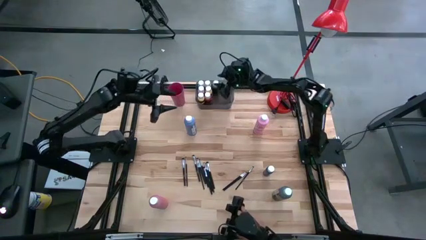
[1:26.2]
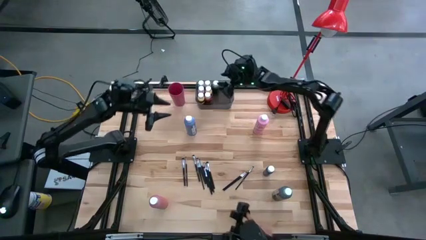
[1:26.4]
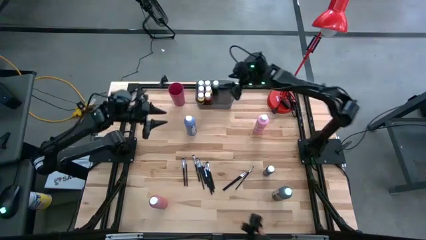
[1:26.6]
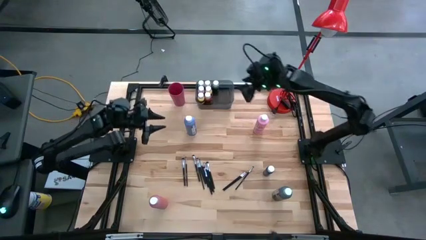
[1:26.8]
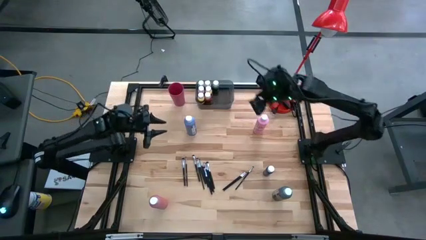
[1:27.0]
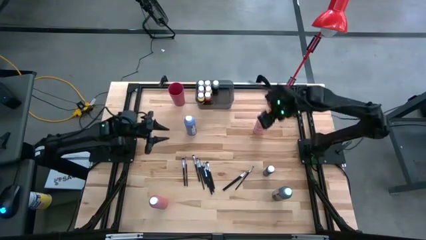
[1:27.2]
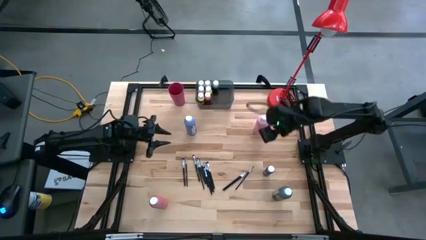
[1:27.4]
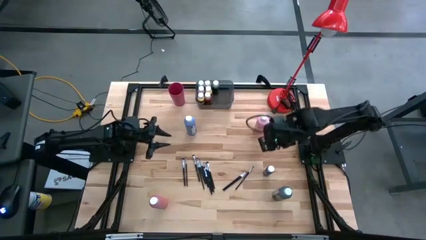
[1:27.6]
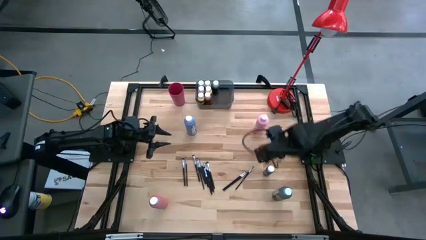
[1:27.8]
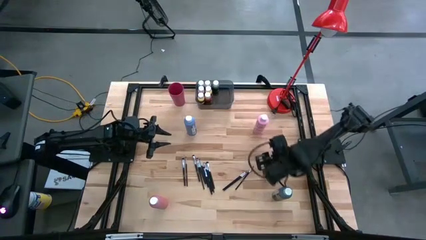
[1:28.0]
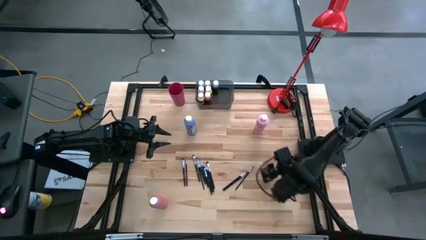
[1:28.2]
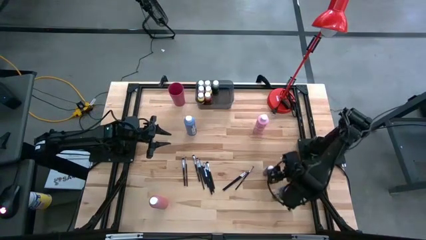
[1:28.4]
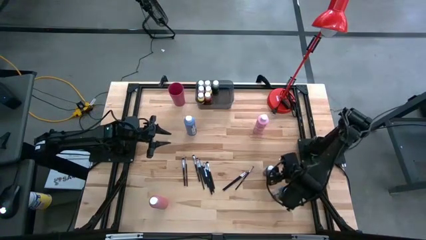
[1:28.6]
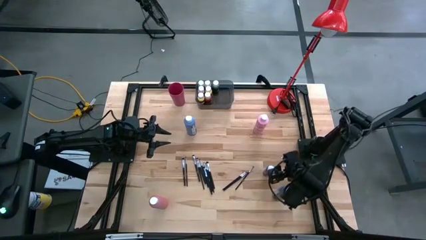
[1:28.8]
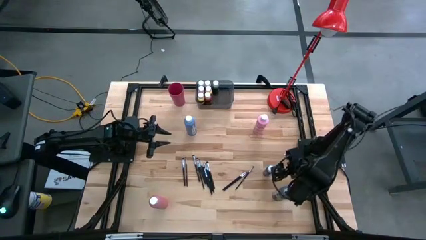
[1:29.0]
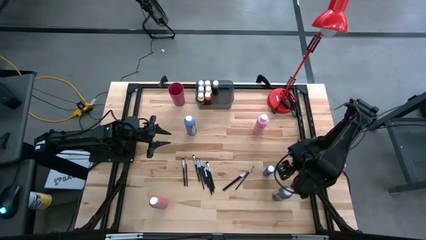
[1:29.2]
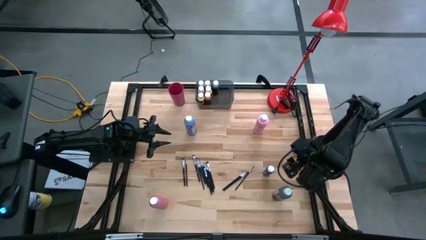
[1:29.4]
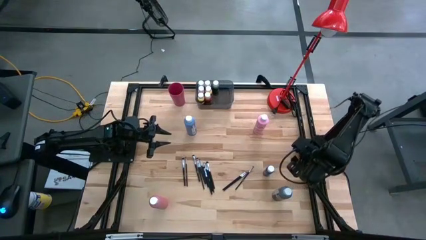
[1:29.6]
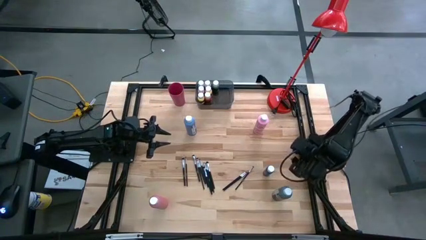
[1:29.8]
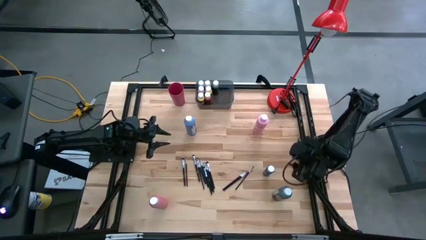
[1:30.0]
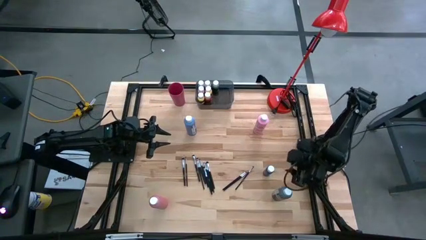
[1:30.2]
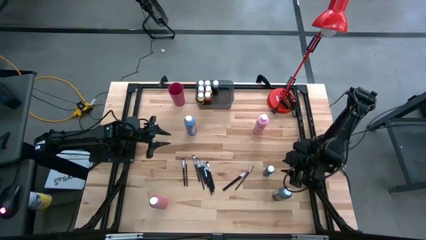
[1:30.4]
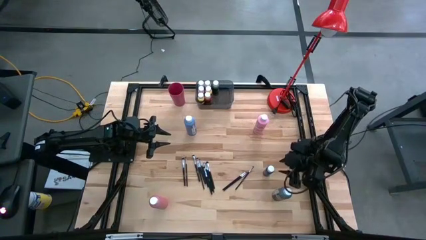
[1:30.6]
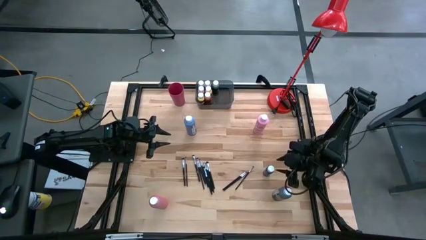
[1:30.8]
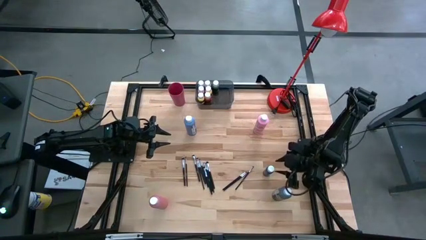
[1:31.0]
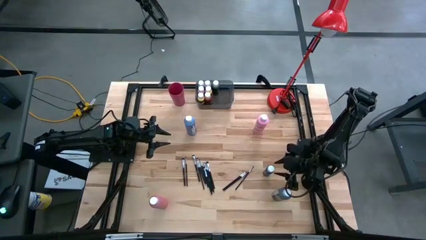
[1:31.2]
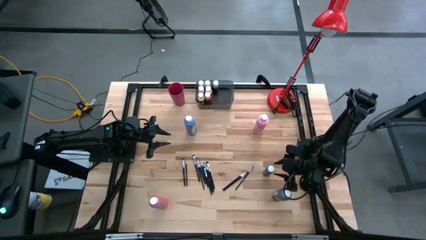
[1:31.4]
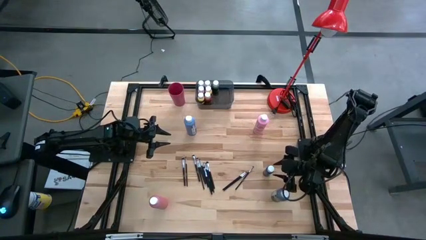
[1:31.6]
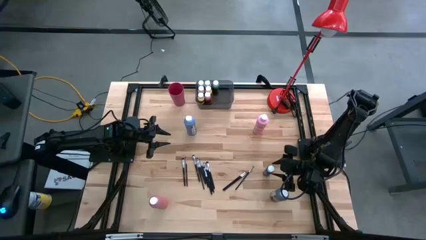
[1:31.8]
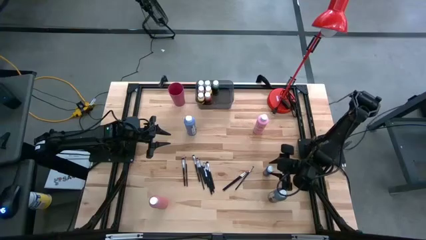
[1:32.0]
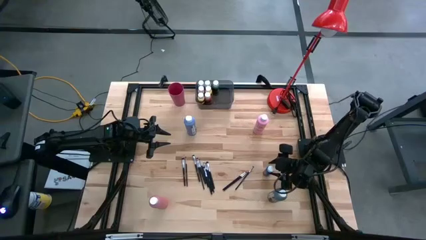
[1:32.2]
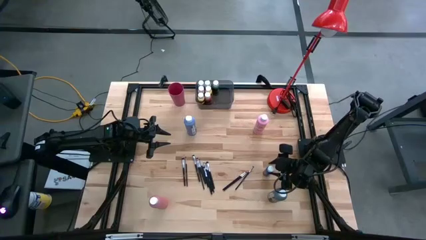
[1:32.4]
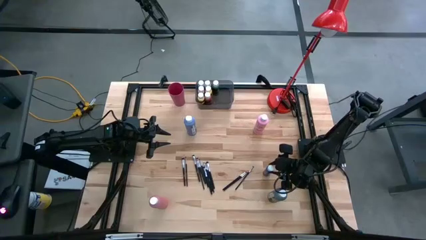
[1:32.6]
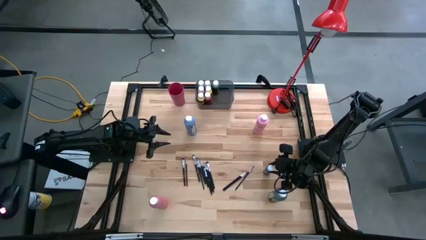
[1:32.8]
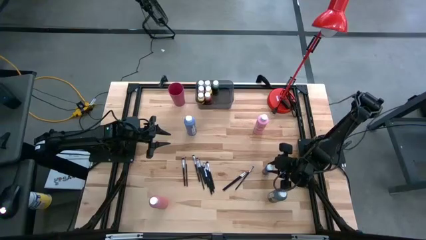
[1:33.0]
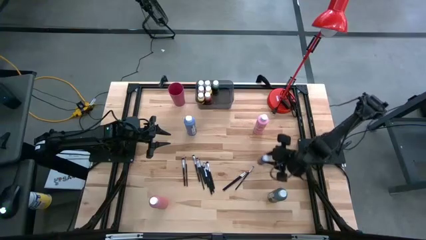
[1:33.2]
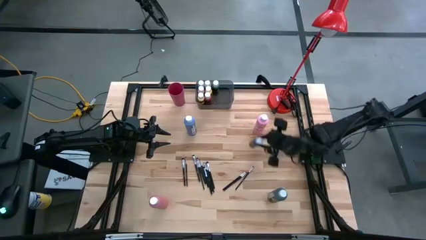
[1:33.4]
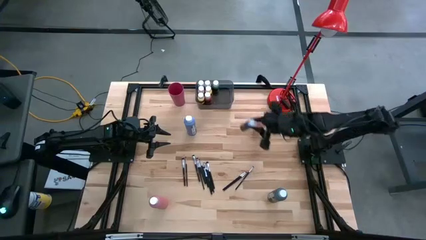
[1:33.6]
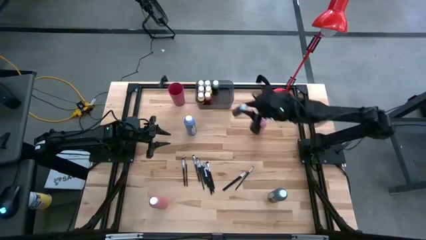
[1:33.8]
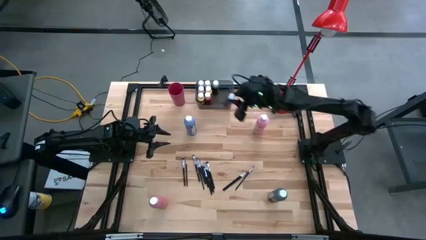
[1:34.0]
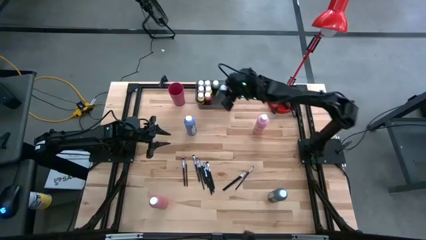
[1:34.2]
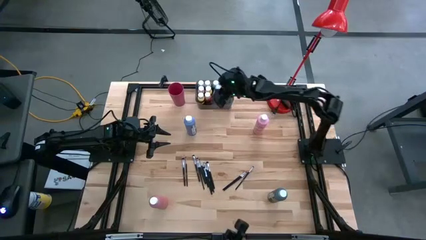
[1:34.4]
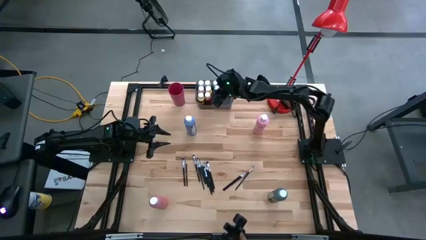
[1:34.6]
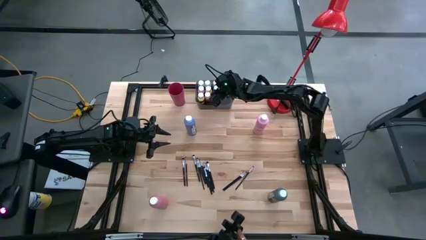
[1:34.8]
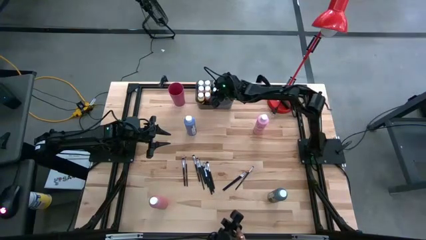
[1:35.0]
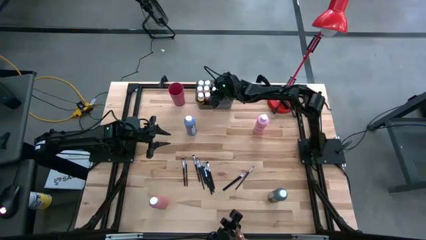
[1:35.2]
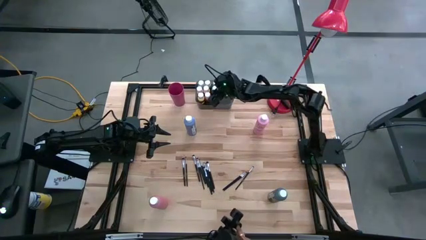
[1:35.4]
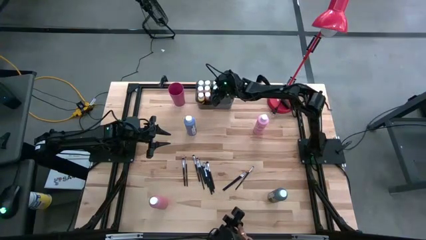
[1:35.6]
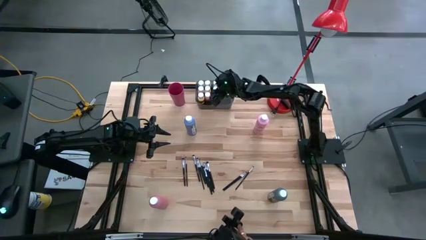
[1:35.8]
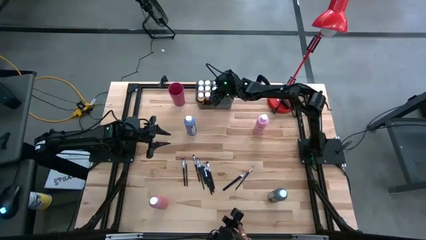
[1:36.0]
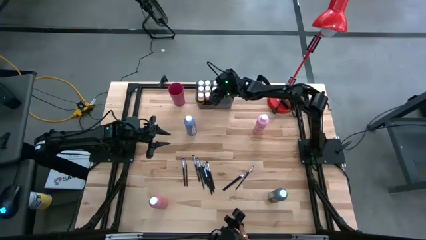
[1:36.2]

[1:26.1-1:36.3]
Task: Pick & Place Paint Supplies
Put the dark blue paint bottle into the black bin

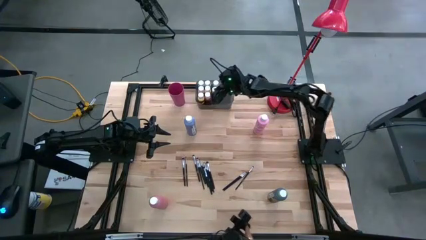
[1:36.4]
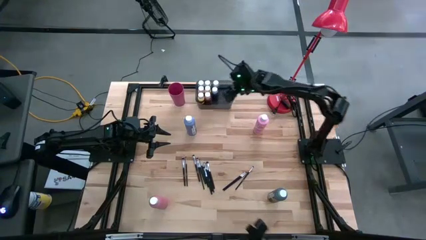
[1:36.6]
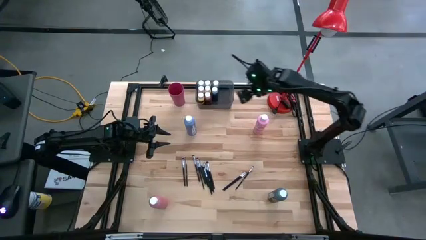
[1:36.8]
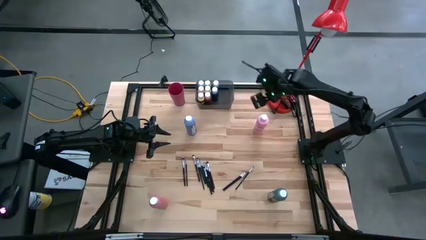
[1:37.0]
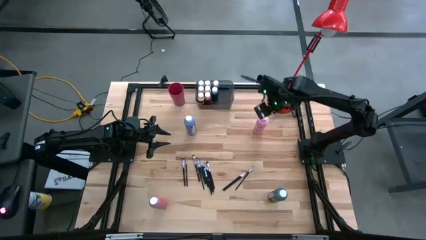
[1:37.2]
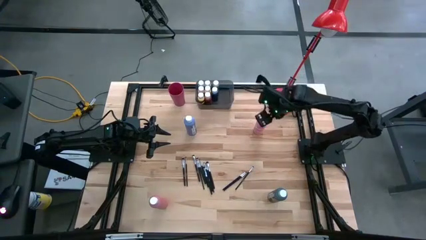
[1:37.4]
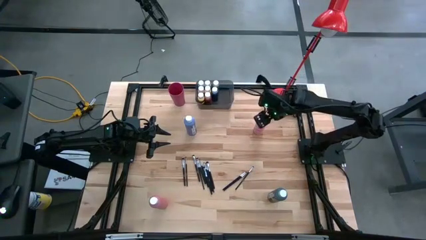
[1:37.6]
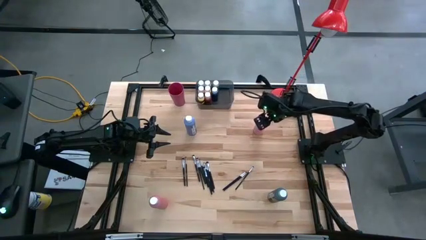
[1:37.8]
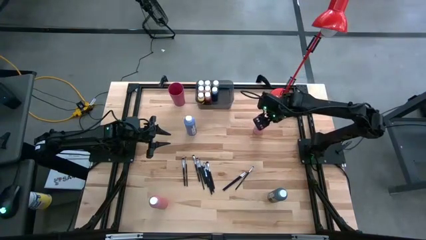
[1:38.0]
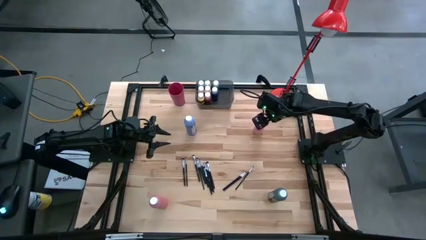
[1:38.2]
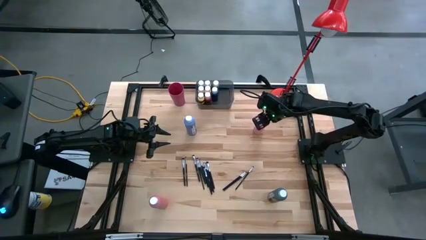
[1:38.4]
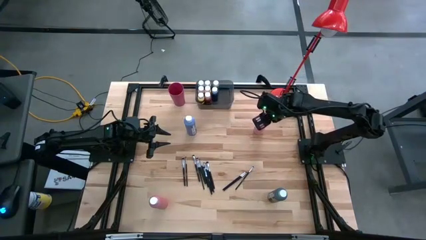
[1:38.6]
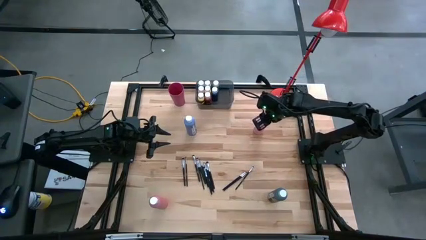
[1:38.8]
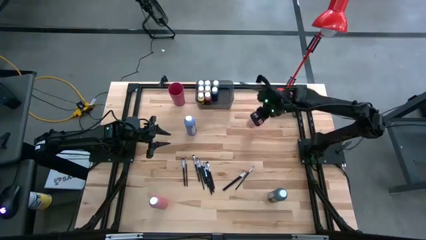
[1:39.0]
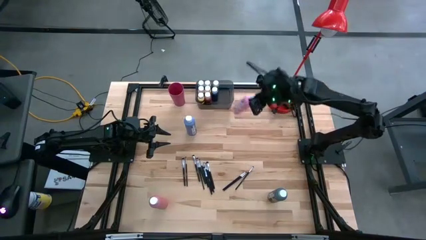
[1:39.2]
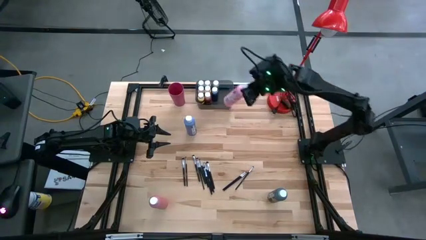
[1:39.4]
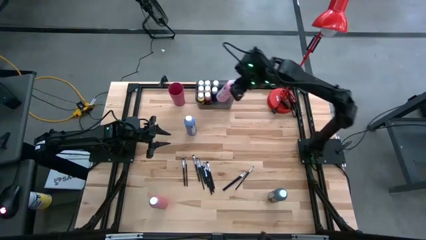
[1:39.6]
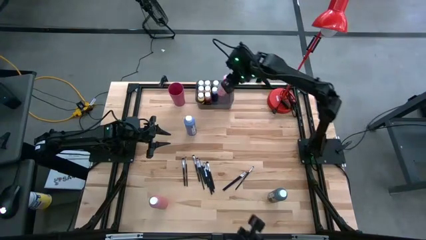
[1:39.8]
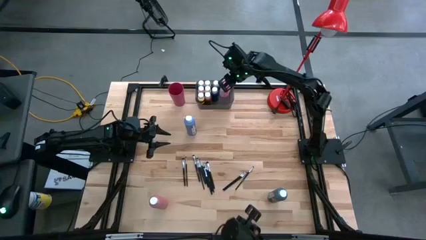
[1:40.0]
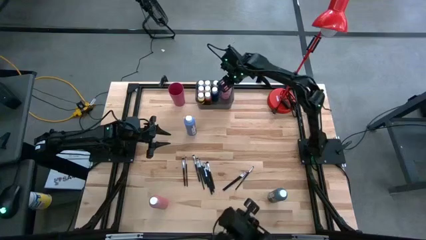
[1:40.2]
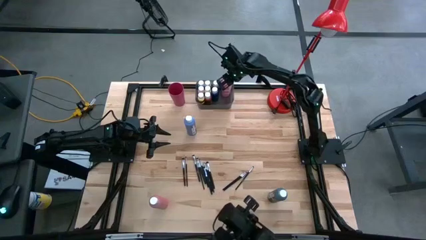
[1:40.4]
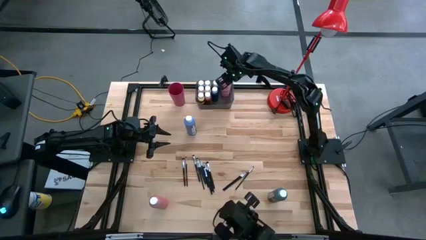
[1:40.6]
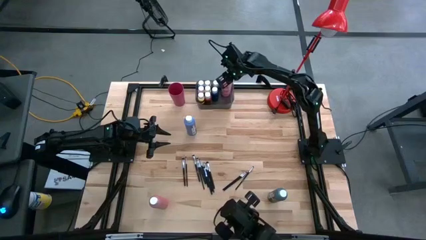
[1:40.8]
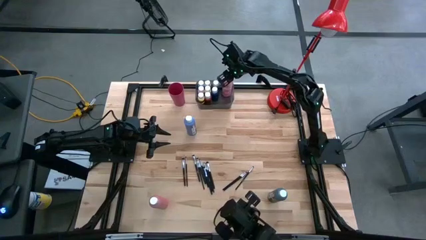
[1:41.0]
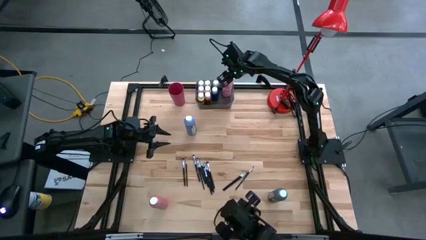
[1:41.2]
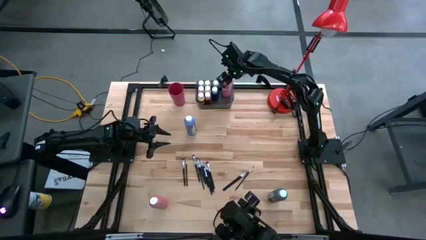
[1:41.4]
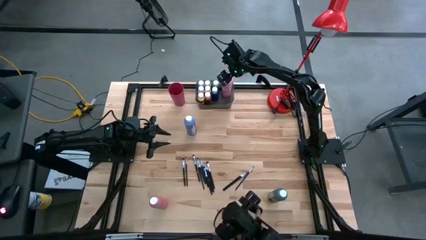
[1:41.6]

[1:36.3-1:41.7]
Put the pink paint bottle into the black bin
